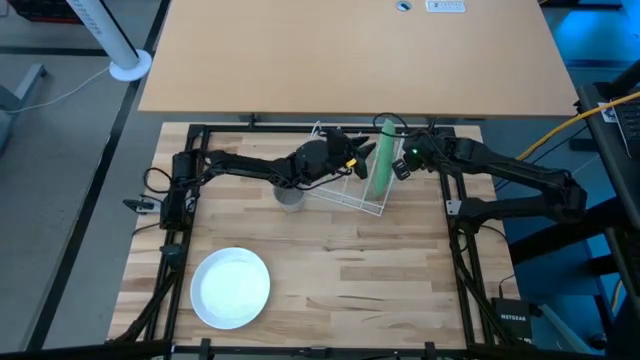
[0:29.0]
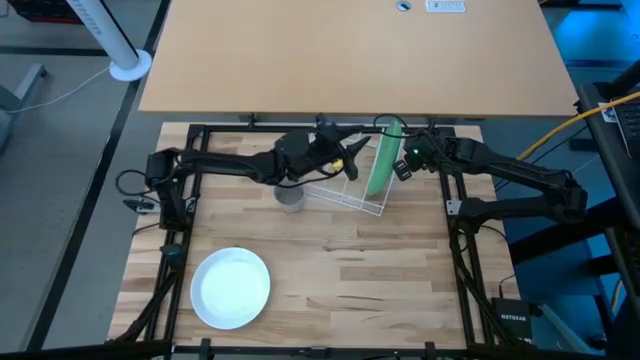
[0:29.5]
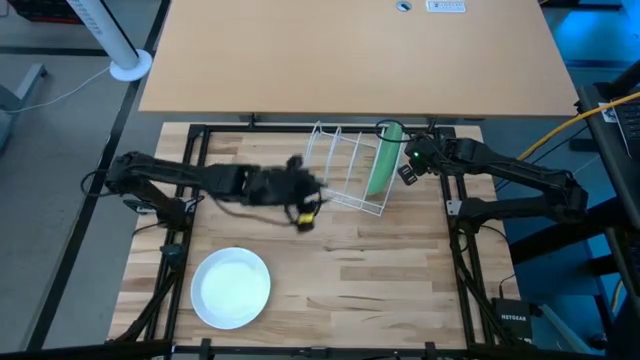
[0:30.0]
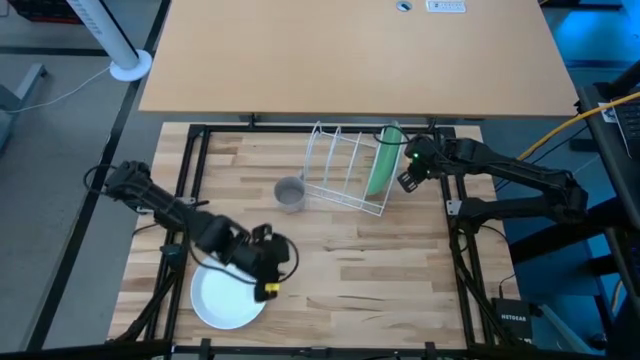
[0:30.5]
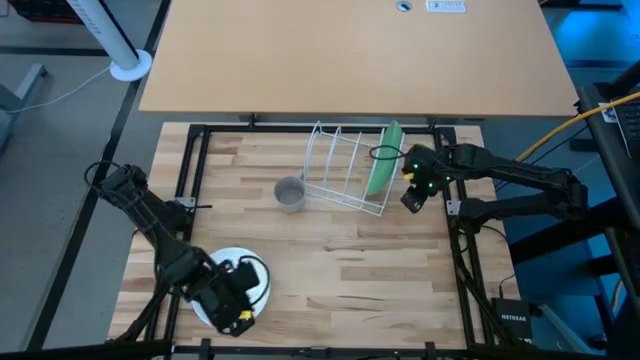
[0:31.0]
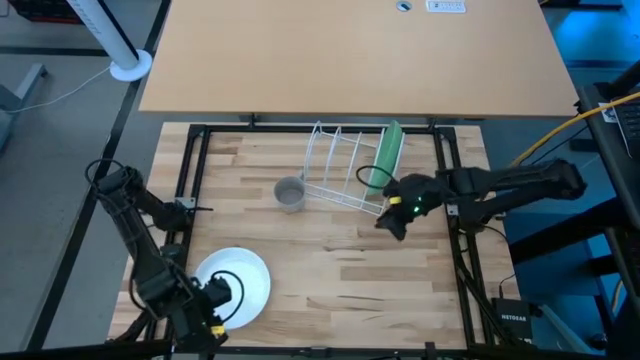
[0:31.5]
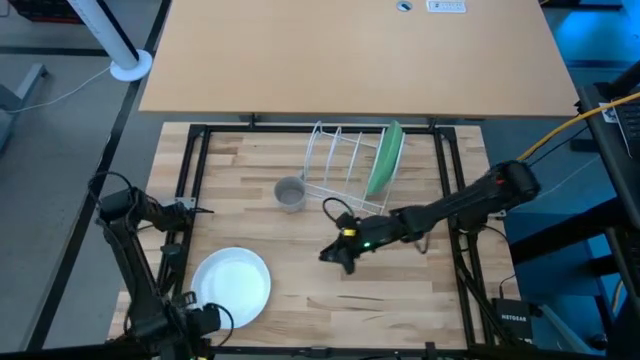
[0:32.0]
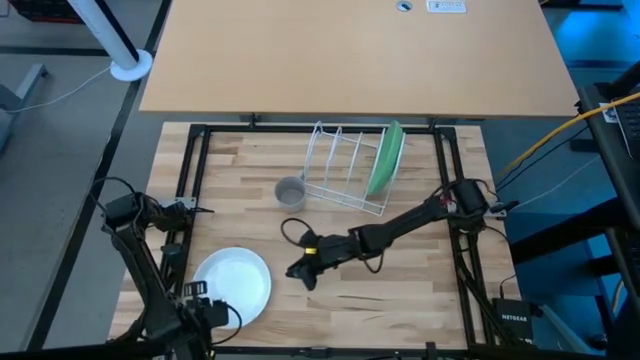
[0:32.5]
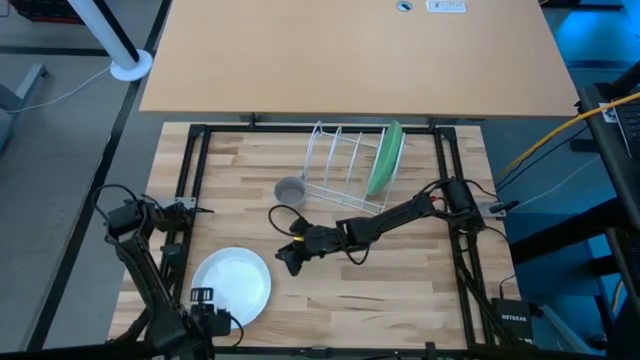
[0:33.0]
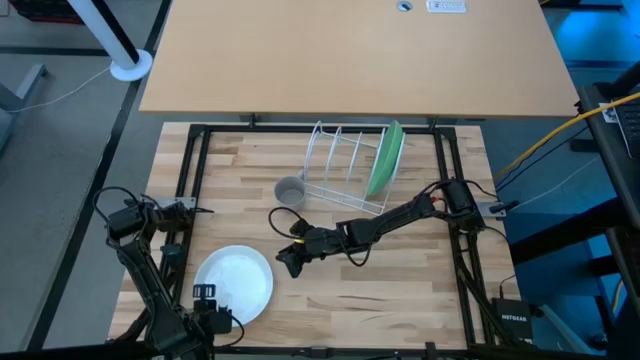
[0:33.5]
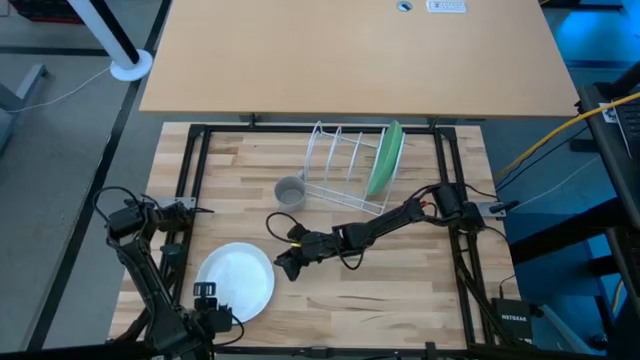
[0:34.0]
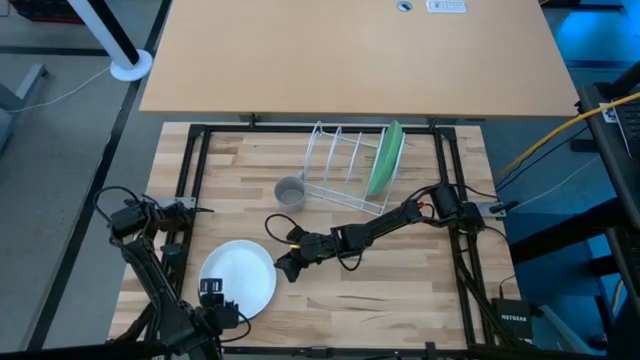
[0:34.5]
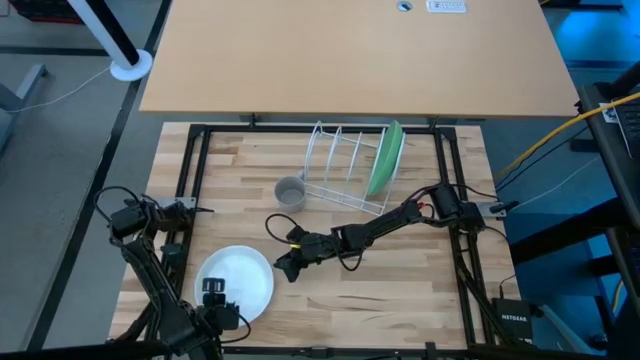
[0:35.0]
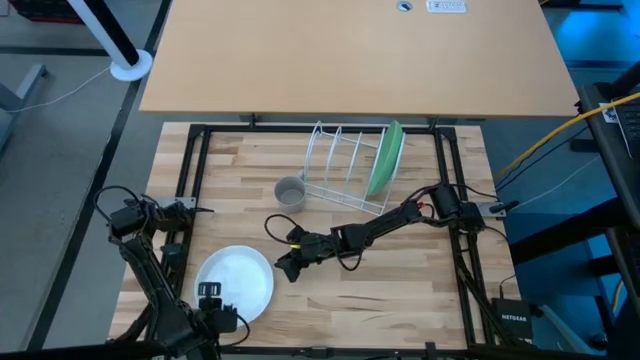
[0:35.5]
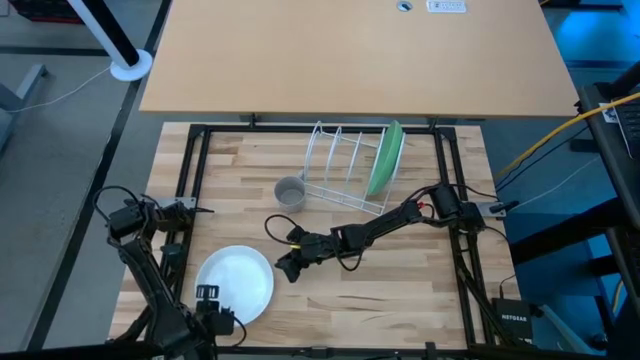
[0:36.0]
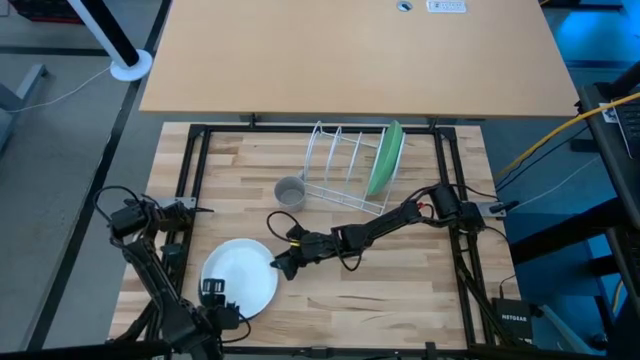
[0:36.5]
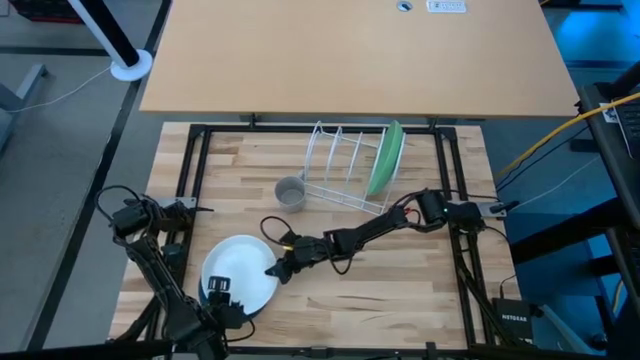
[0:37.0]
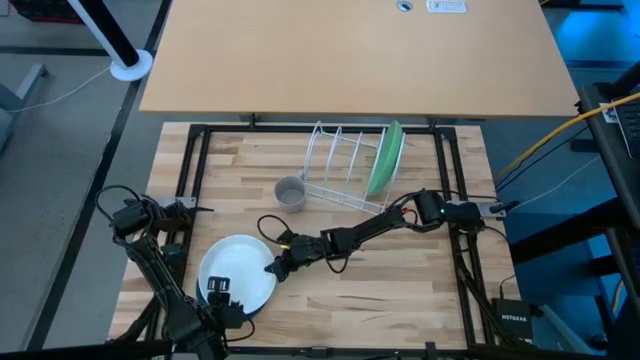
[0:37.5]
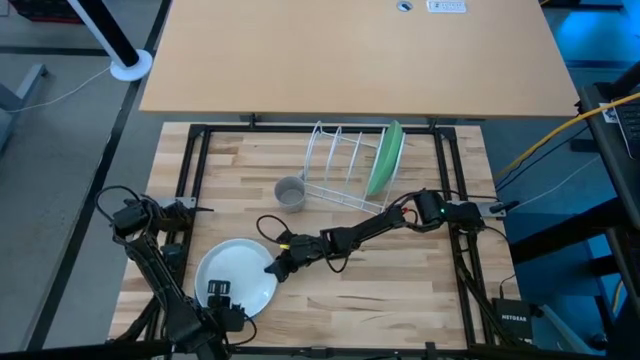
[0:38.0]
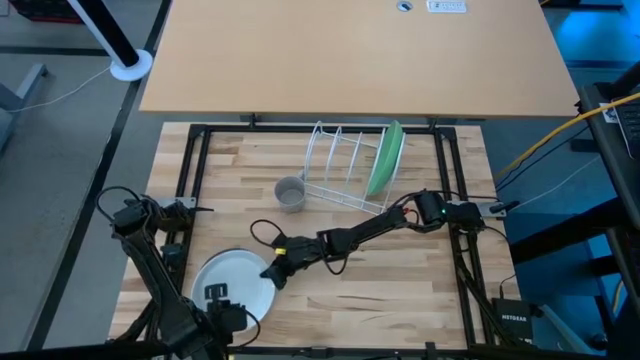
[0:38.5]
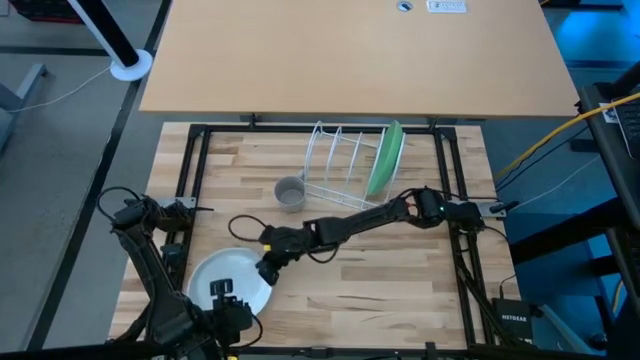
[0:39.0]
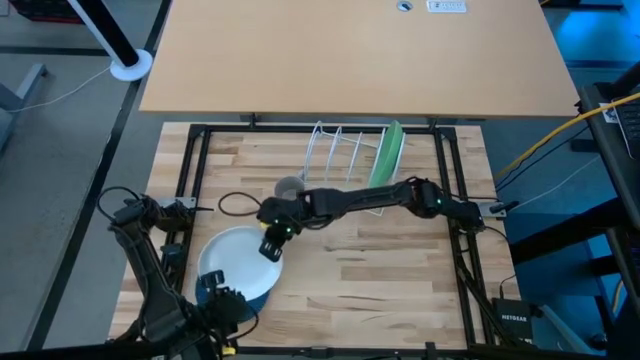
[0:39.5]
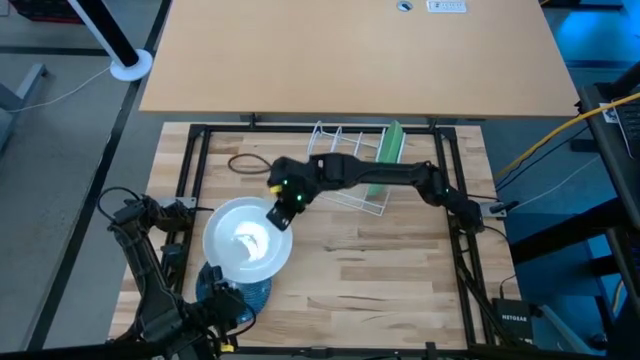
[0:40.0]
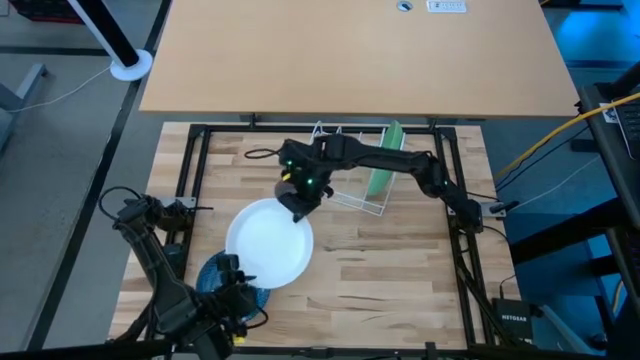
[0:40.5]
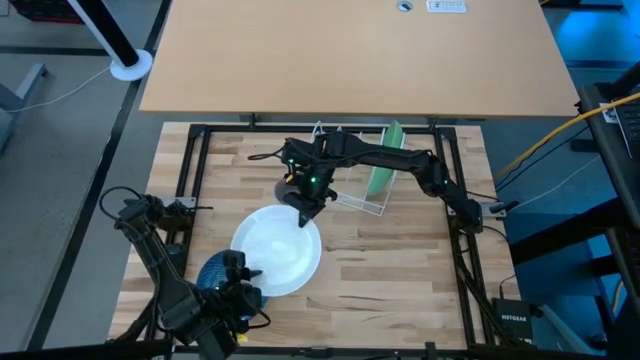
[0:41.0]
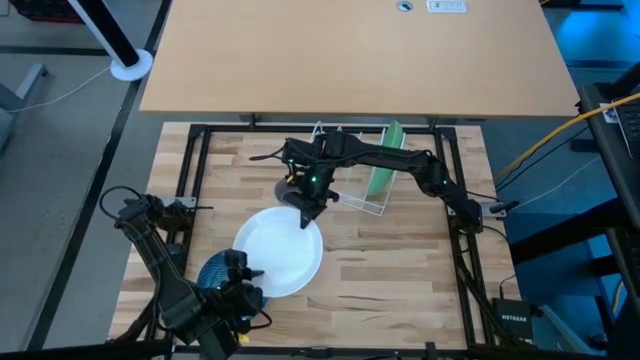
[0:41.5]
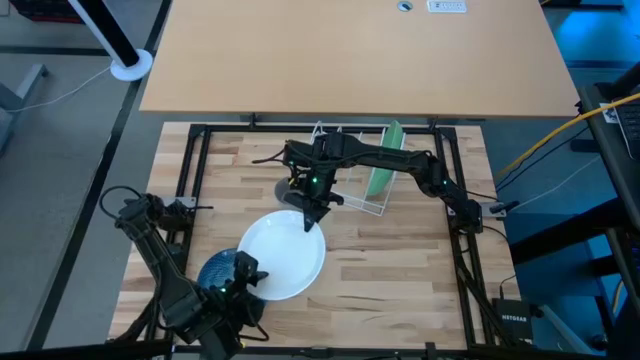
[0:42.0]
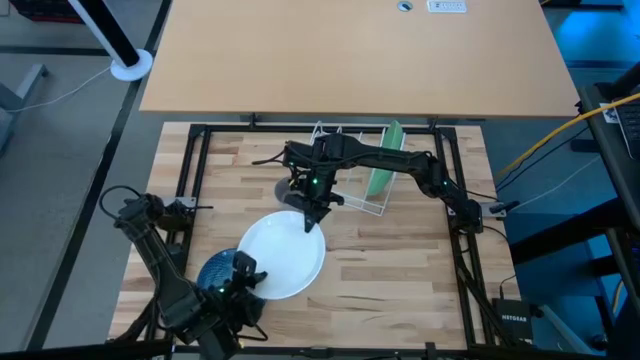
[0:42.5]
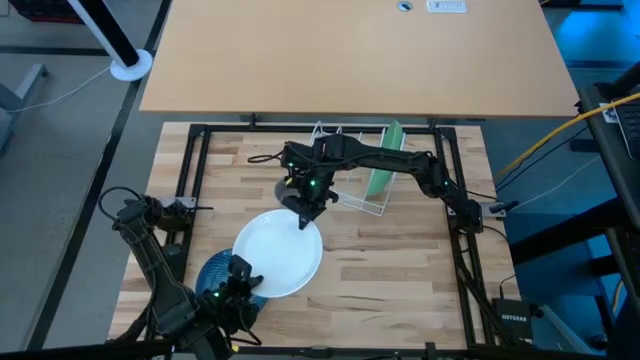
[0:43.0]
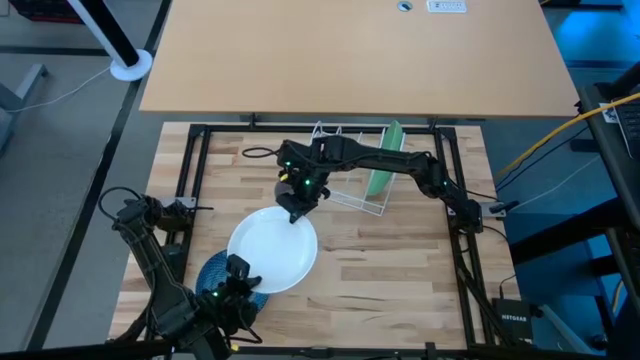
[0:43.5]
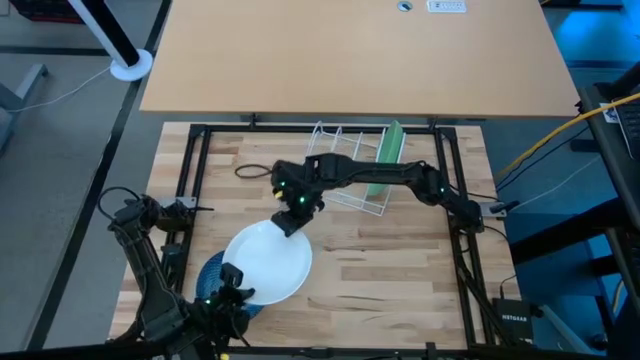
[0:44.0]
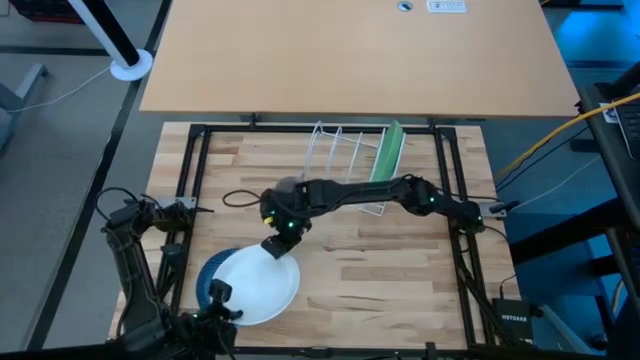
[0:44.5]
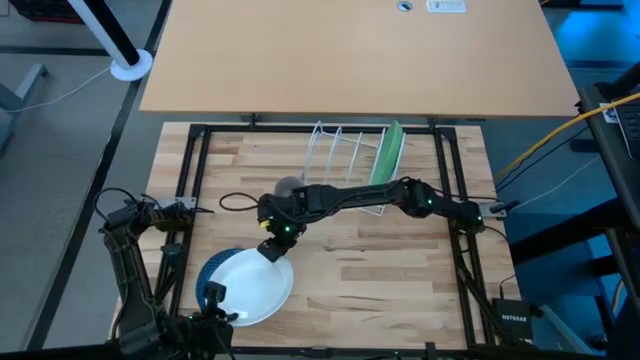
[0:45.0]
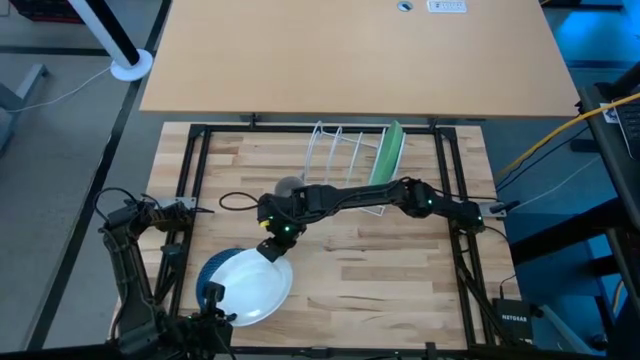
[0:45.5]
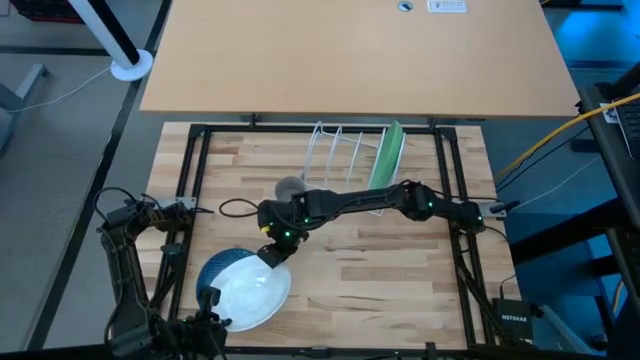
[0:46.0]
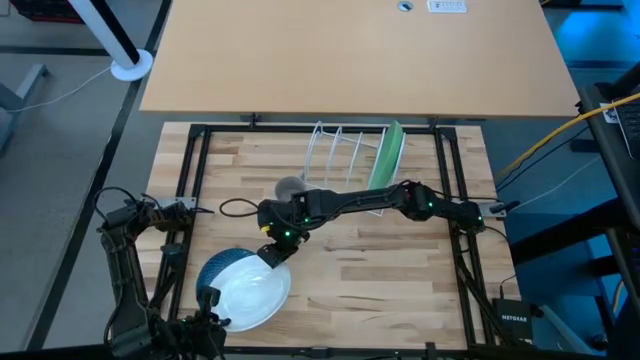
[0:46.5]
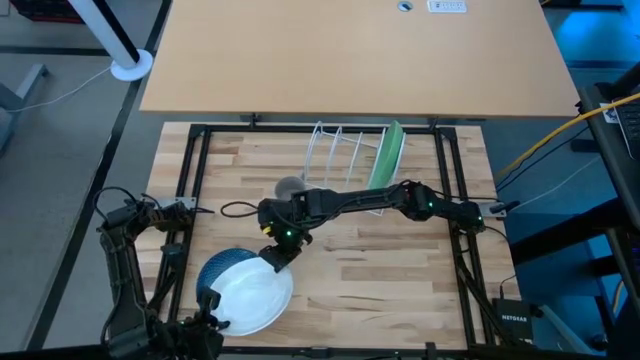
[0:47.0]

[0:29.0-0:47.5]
Task: Sort dishes
Put the white plate in the dish rack

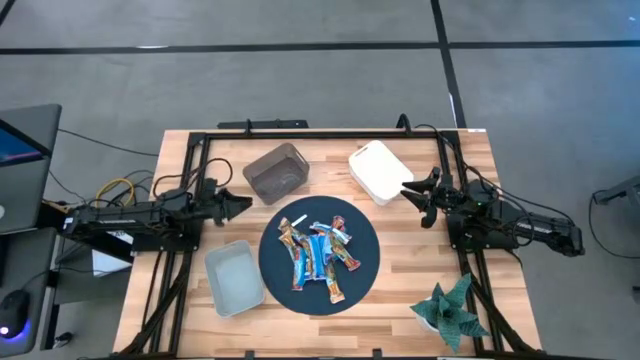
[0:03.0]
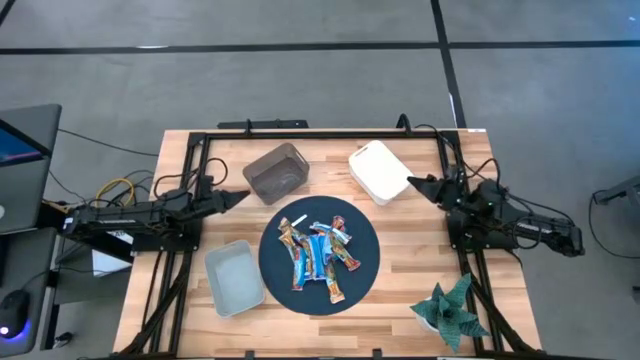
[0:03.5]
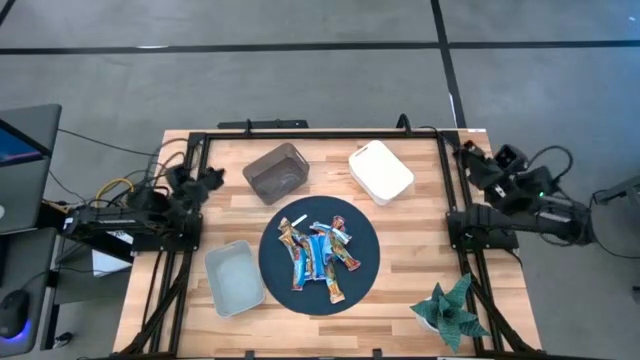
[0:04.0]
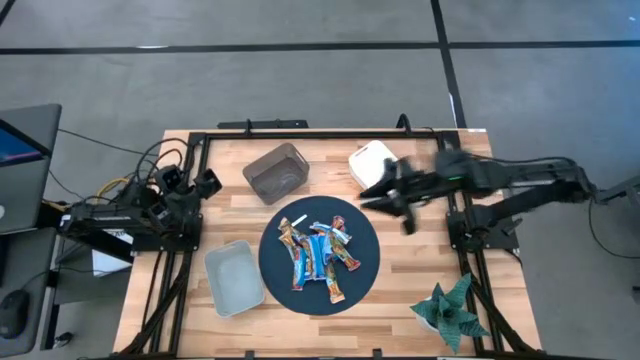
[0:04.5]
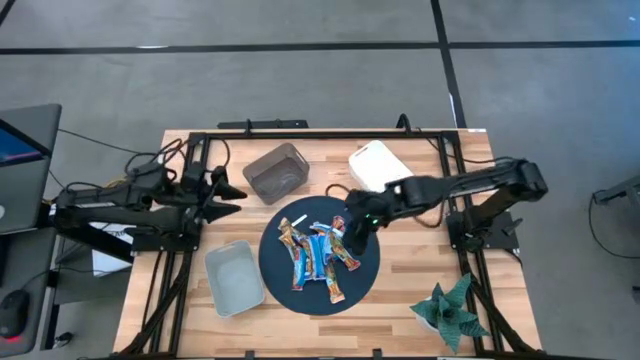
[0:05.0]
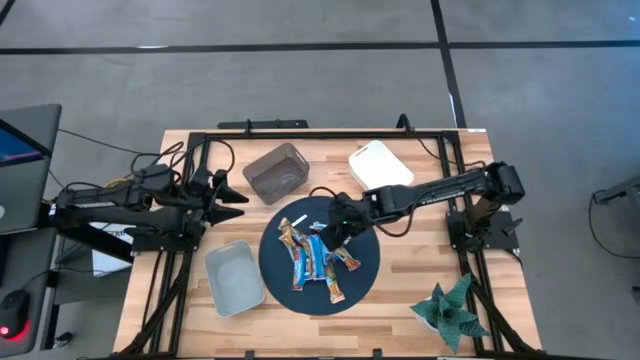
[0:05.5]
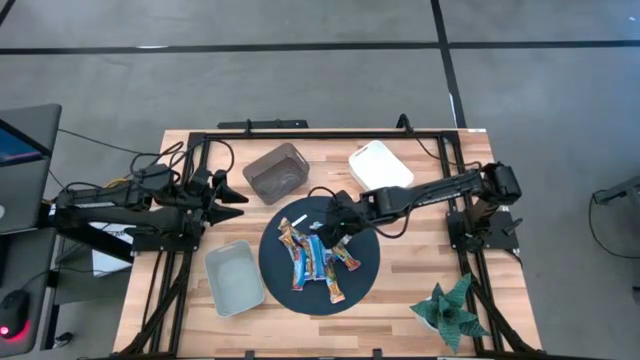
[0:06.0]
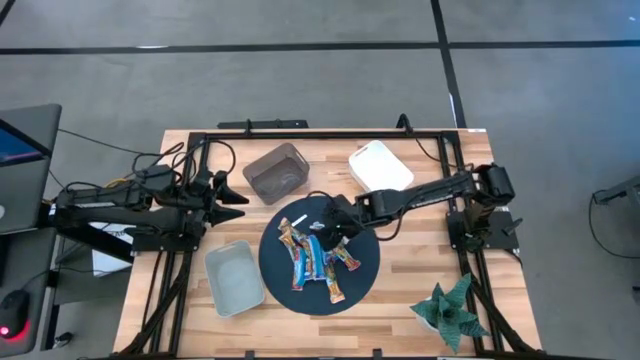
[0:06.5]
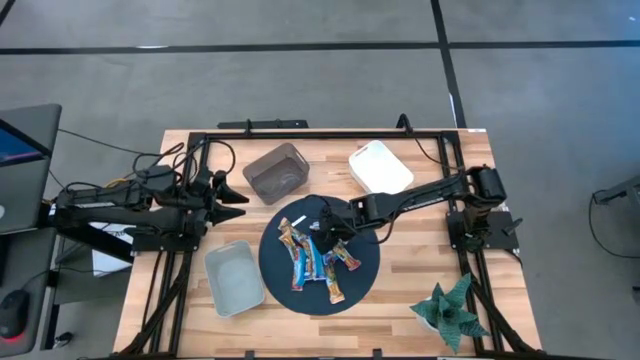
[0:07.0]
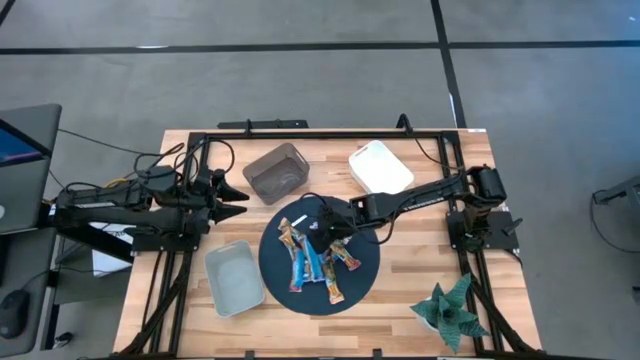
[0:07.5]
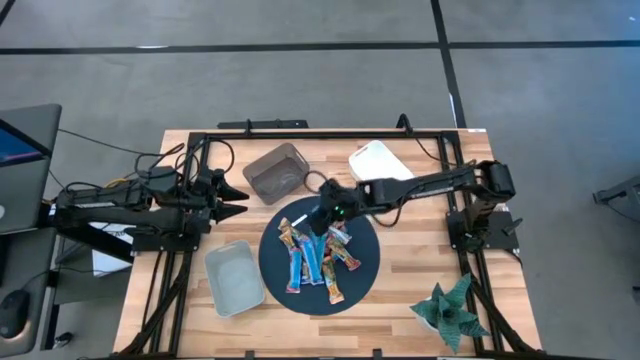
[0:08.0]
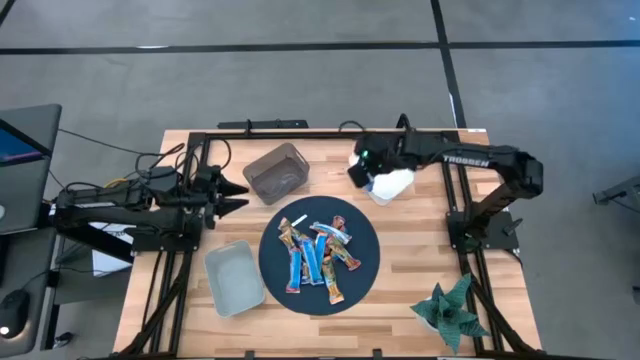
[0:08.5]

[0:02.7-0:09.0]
Task: Pick and place Granola Bars by type
Put the blue granola bar into the white bin
